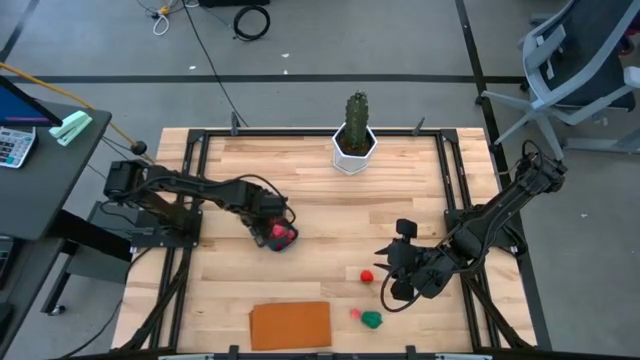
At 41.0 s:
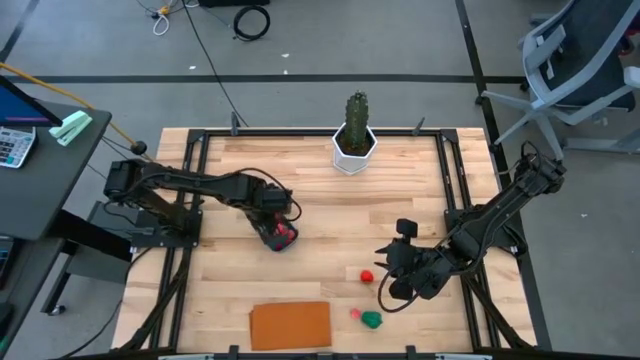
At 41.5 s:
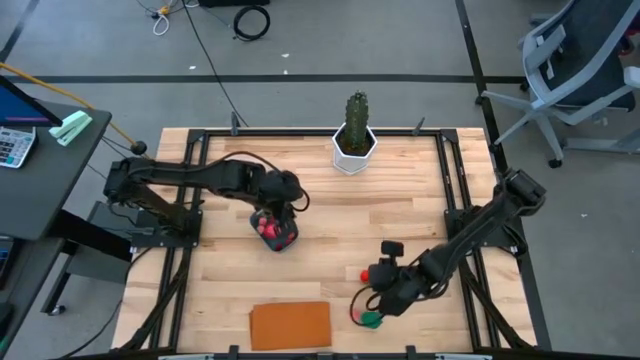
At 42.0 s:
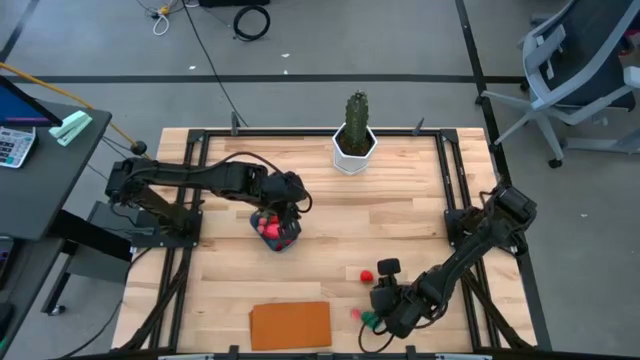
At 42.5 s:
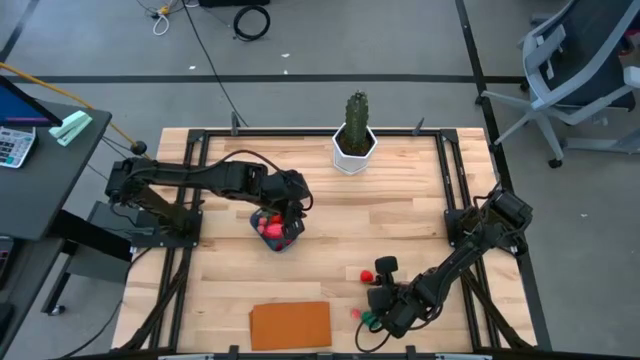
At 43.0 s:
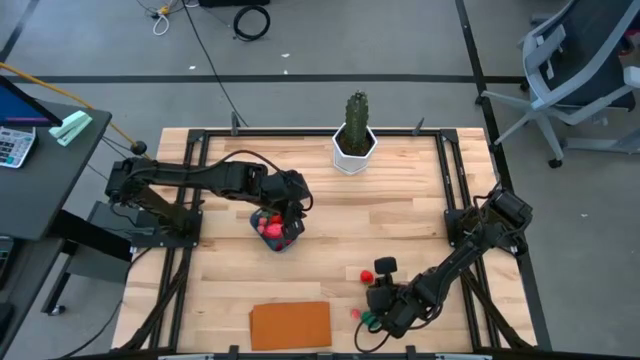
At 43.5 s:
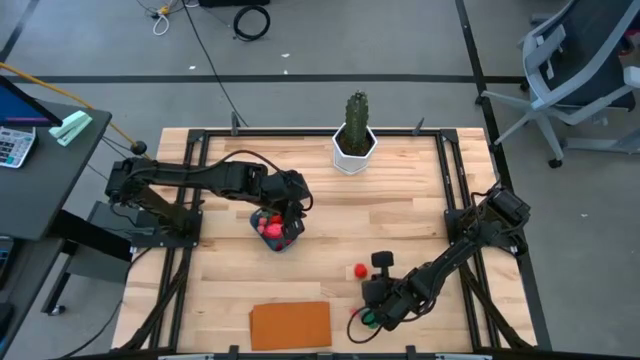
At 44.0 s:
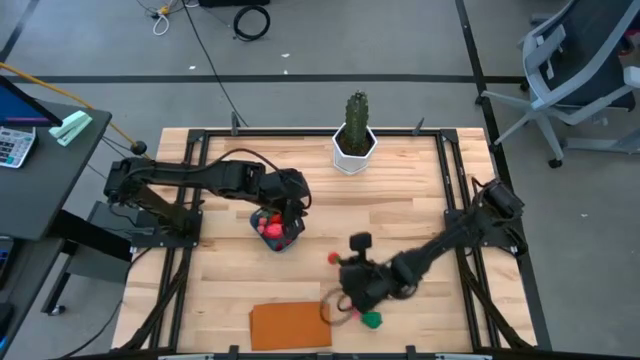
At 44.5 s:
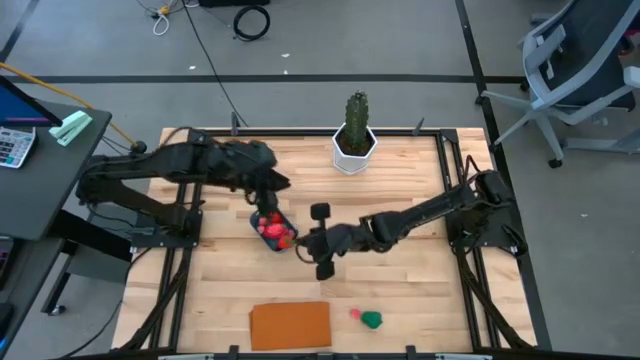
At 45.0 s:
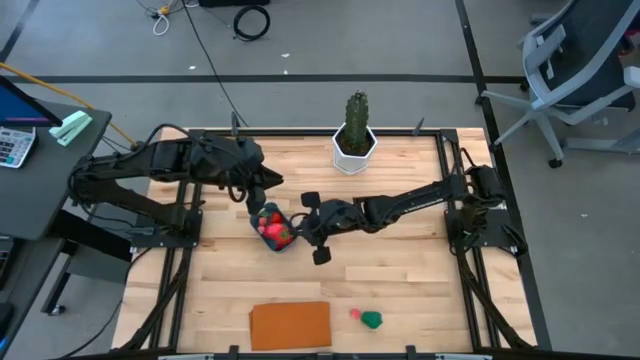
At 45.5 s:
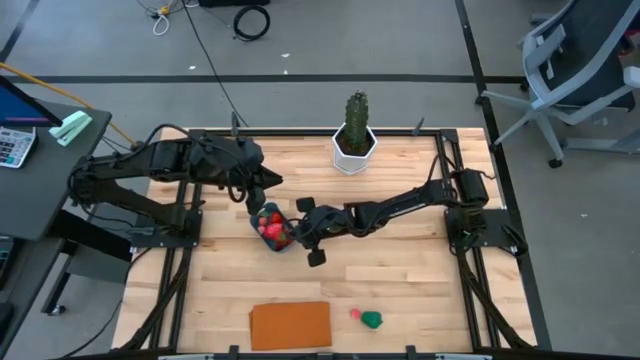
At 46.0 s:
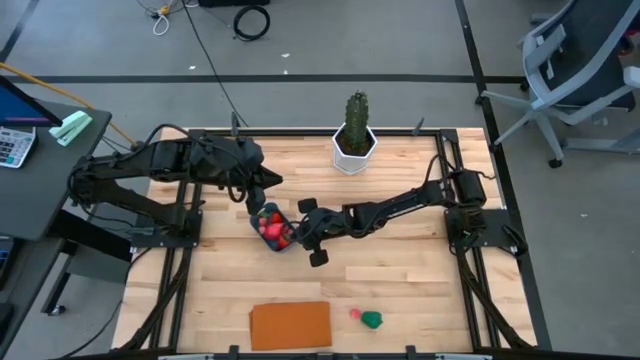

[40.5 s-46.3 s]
Task: Pick and placing Produce into tupperware
Put the strawberry into the blue bin

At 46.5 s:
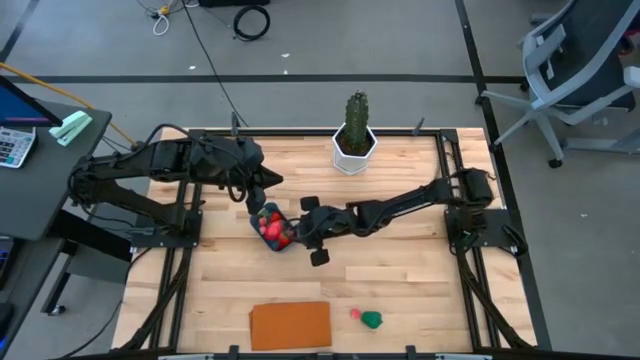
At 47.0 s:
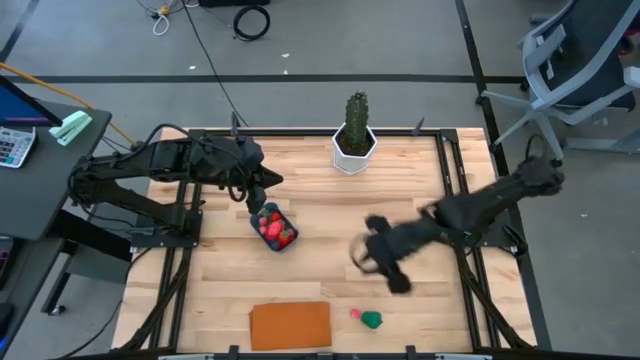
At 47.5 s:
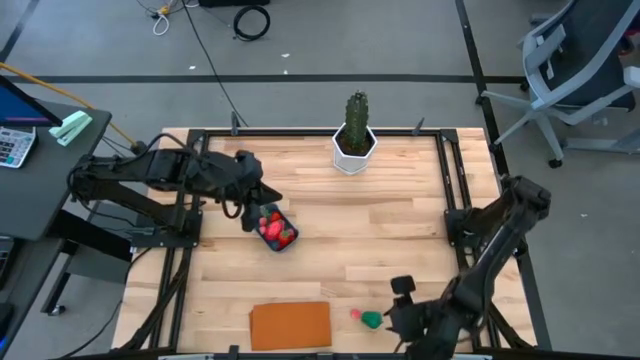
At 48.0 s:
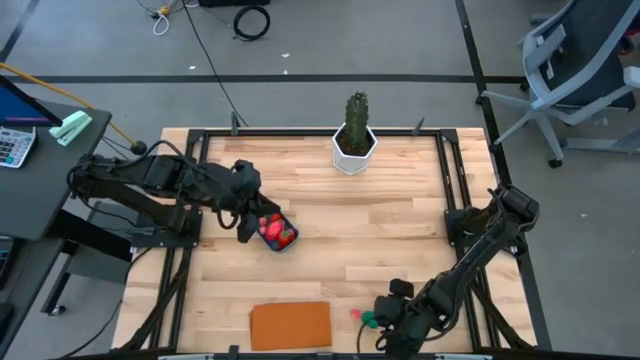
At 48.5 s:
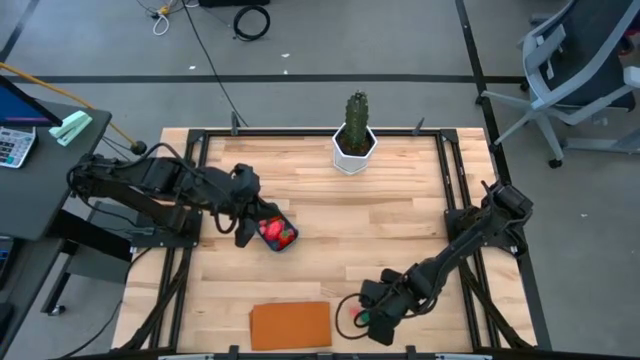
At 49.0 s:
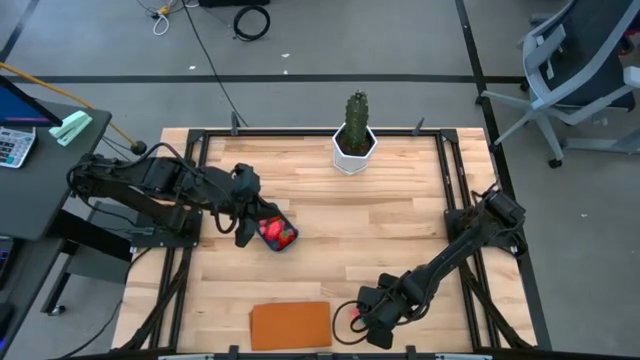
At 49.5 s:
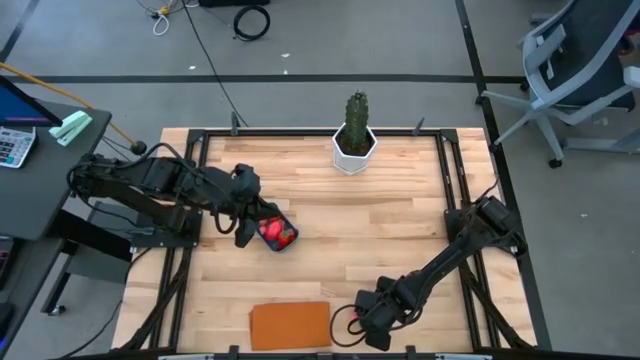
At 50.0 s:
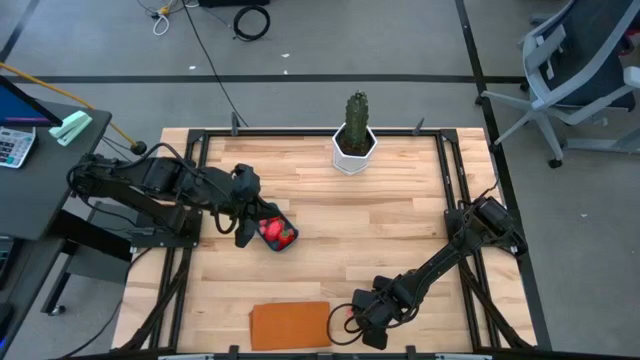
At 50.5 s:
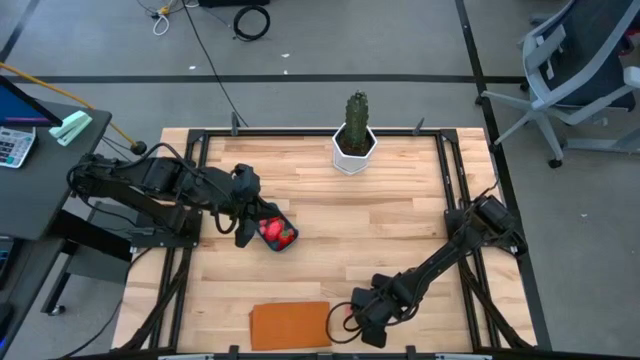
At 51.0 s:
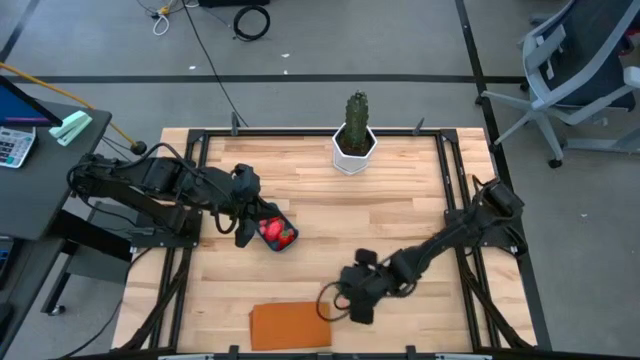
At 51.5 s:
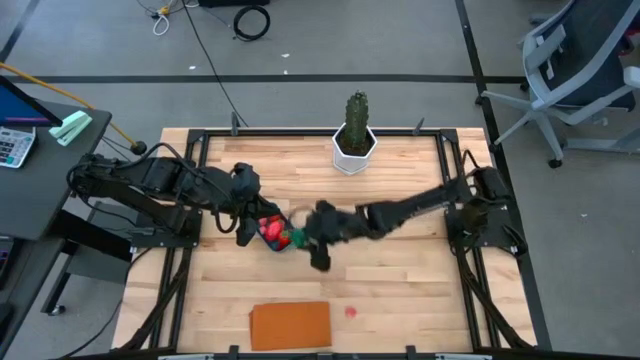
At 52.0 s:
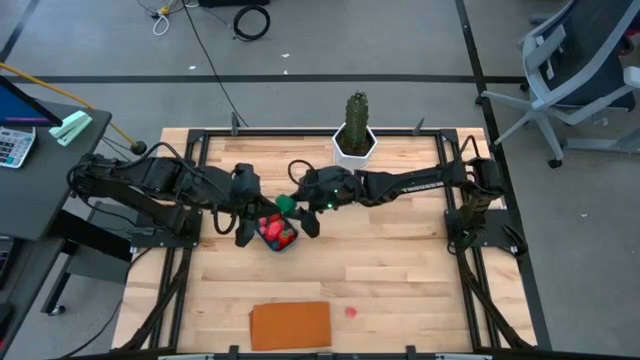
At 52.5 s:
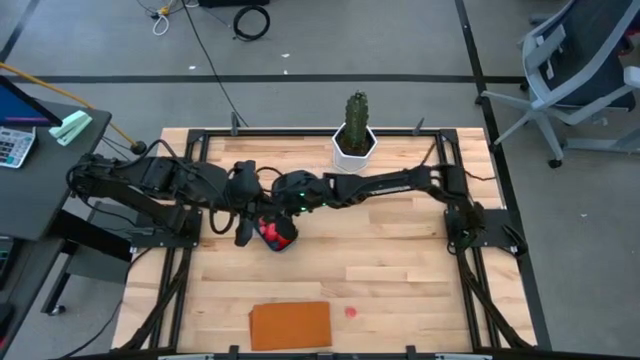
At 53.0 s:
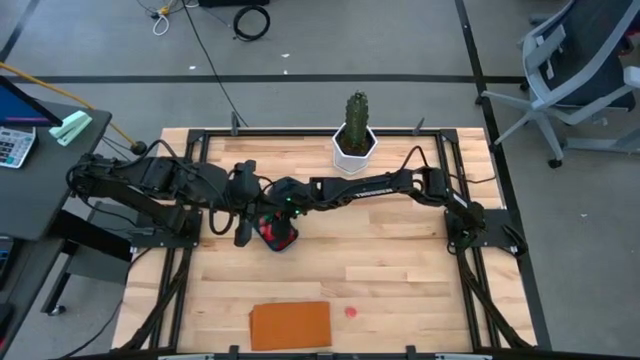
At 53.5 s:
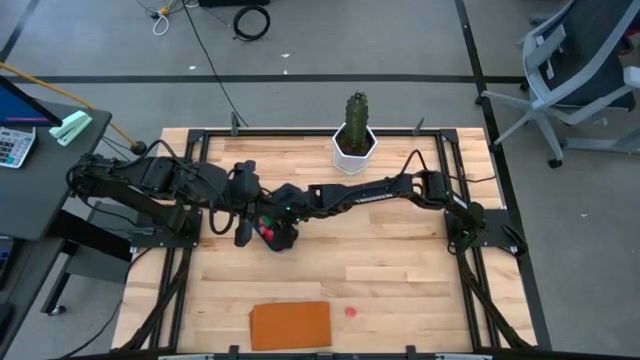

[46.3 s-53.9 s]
Put the bell pepper into the blue bin

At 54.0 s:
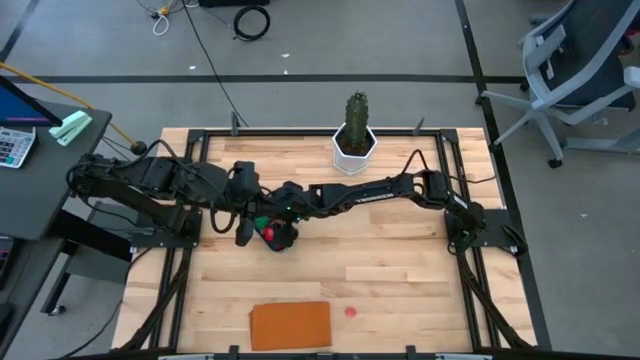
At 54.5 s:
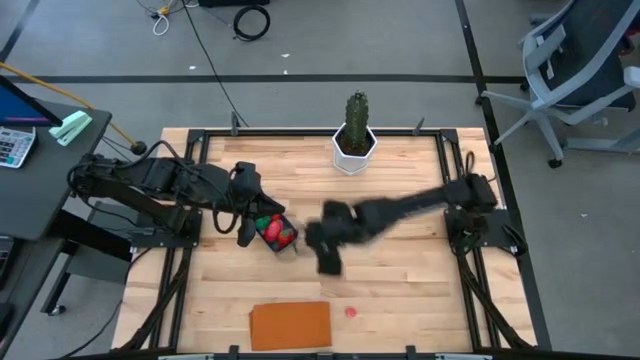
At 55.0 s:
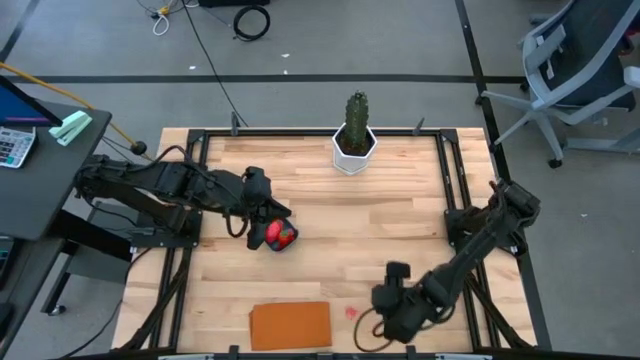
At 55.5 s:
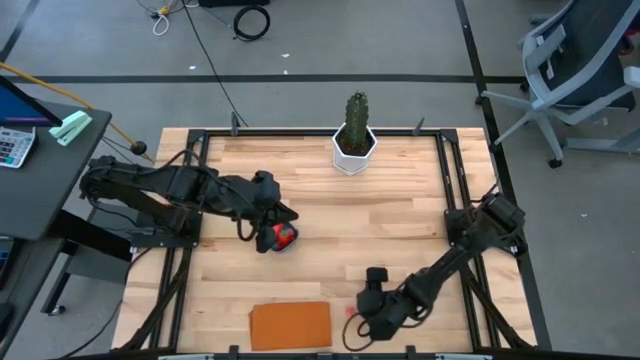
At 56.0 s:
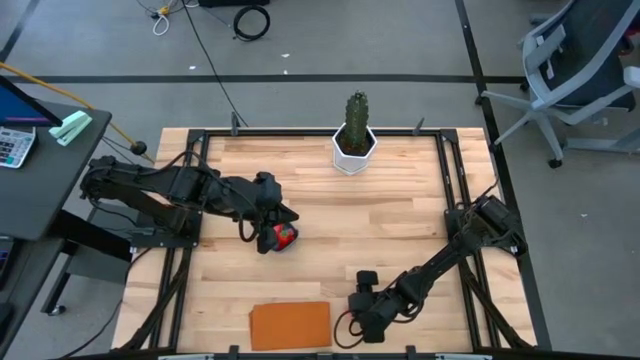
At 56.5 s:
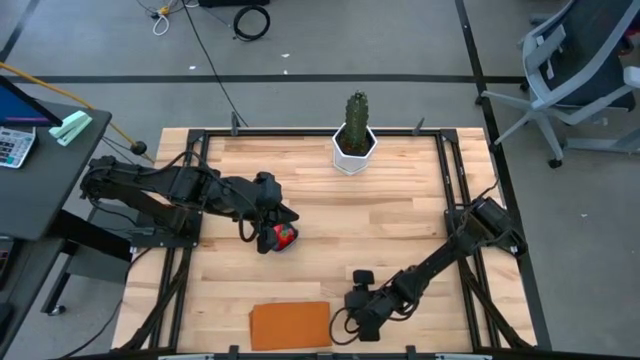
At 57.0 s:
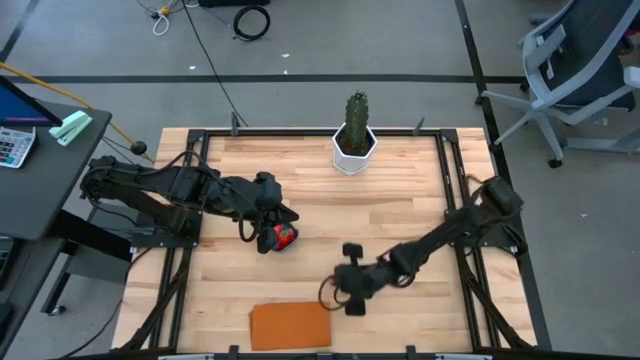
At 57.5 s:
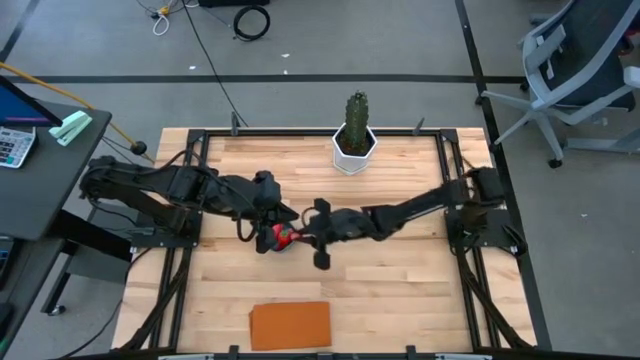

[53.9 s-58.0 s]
Put the peach into the blue bin

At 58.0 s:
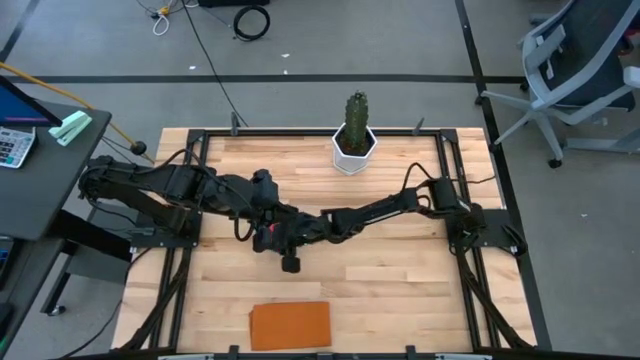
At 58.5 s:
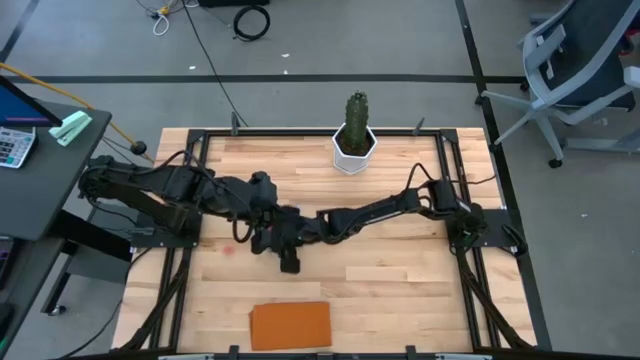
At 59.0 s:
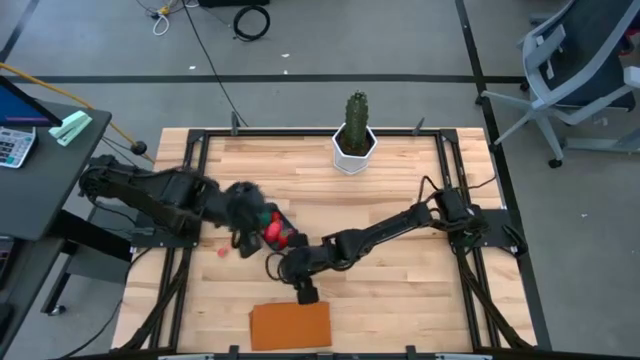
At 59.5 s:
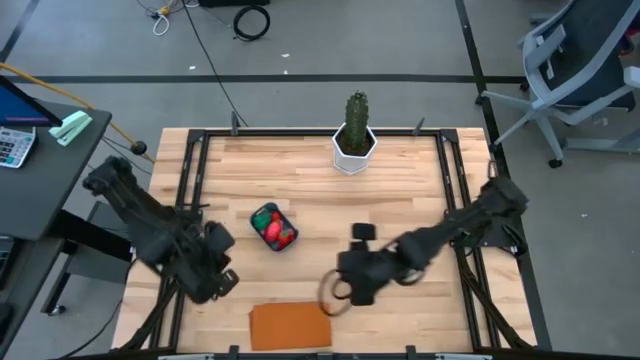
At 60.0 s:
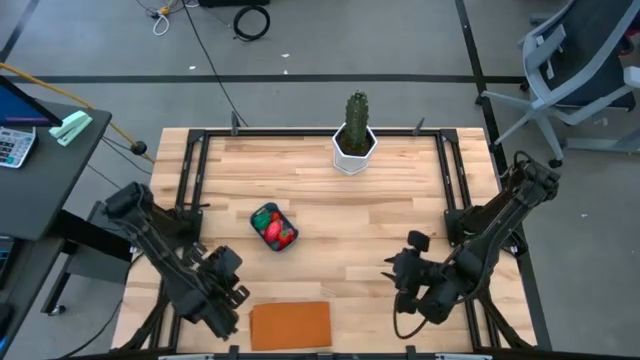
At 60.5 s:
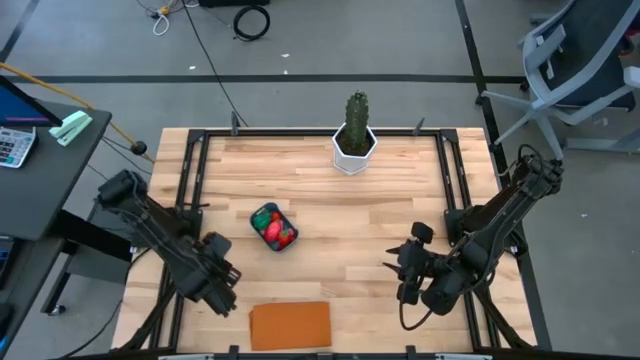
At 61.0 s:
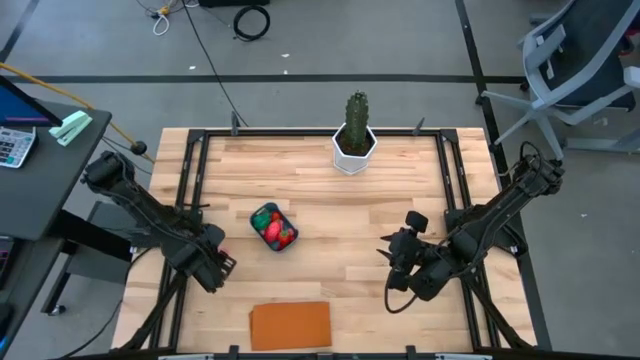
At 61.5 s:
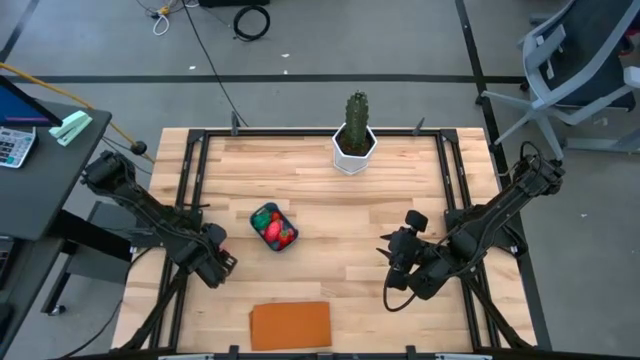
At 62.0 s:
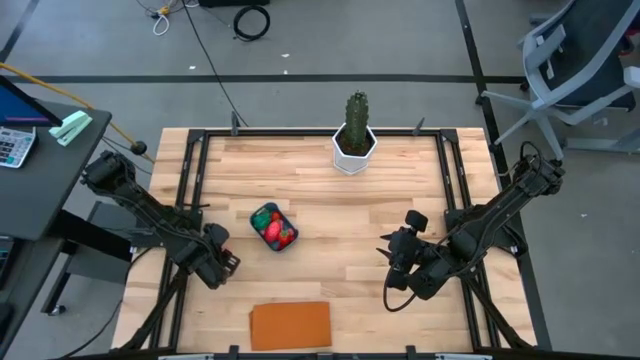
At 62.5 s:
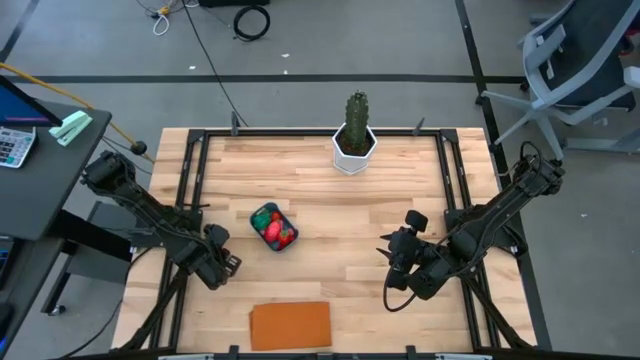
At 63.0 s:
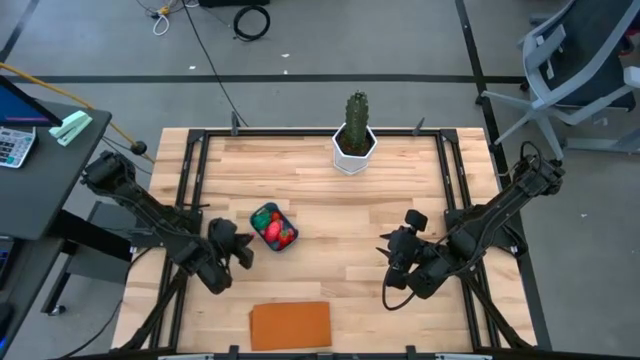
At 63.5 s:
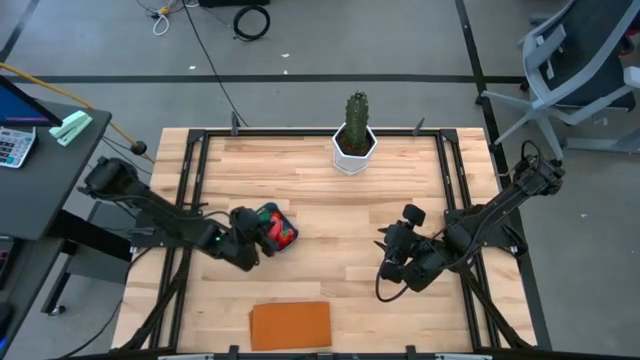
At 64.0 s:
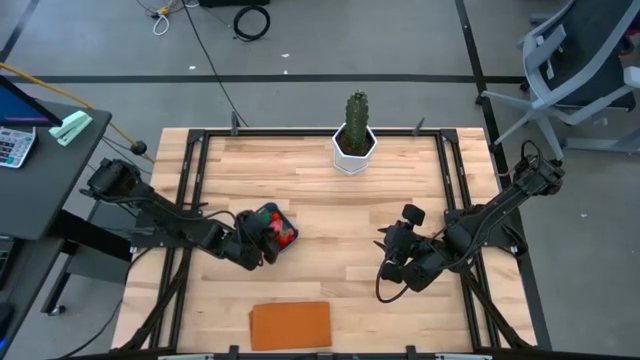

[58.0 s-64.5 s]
Put the peach into the blue bin
